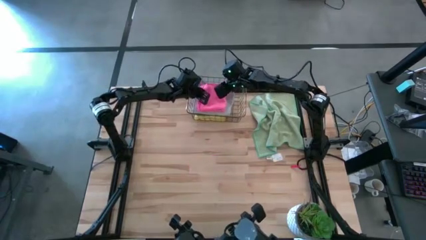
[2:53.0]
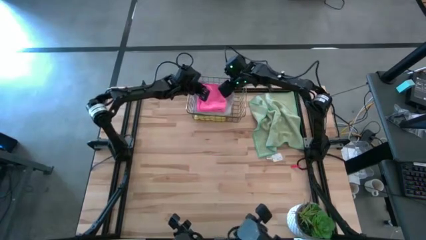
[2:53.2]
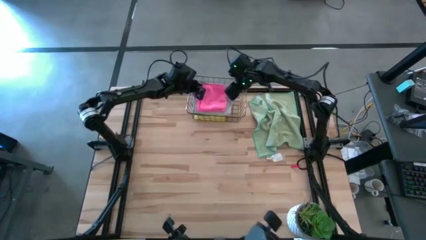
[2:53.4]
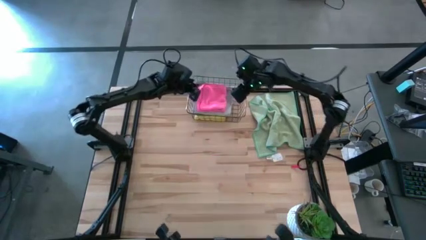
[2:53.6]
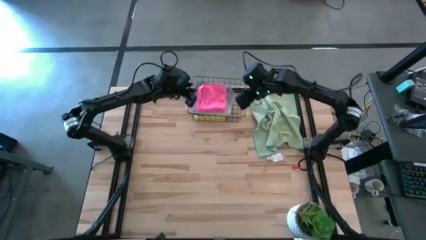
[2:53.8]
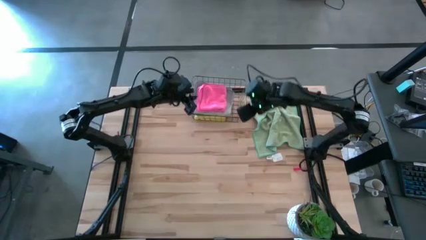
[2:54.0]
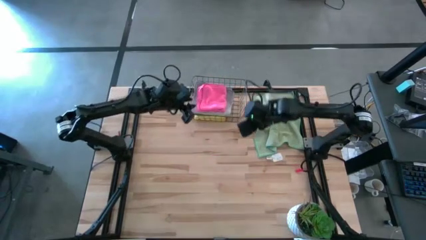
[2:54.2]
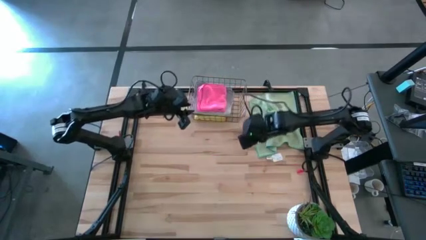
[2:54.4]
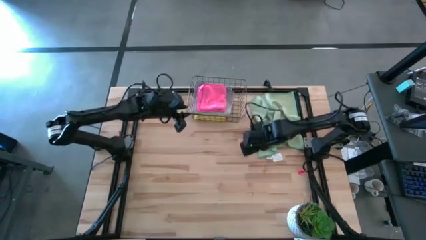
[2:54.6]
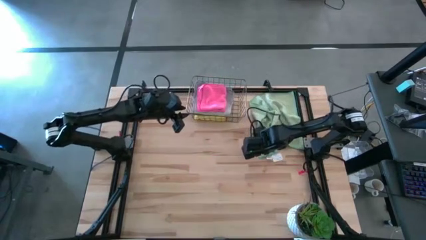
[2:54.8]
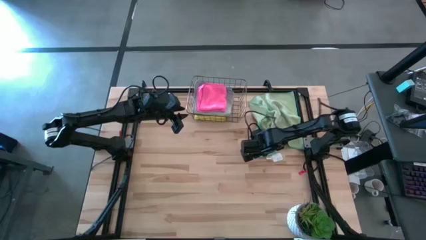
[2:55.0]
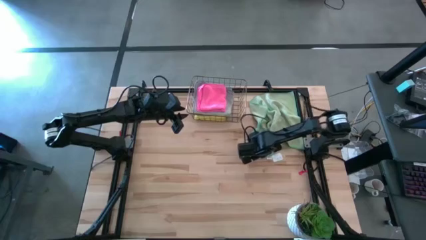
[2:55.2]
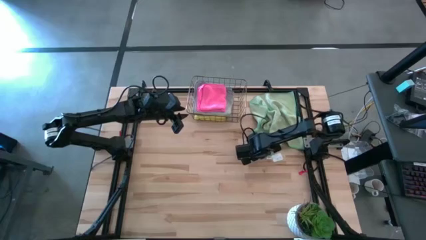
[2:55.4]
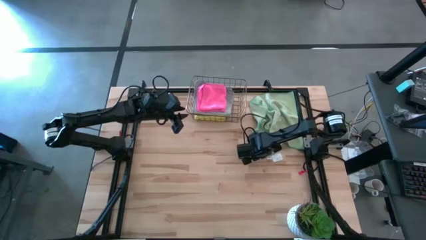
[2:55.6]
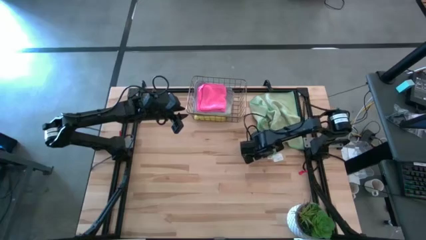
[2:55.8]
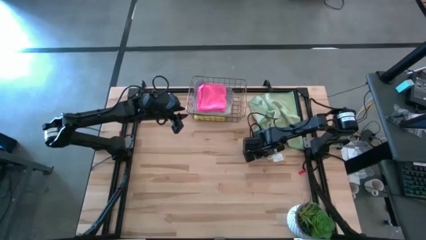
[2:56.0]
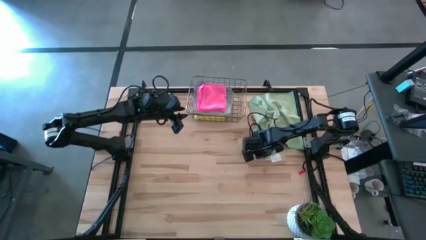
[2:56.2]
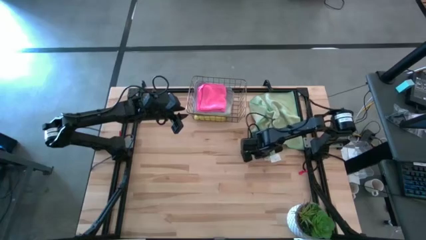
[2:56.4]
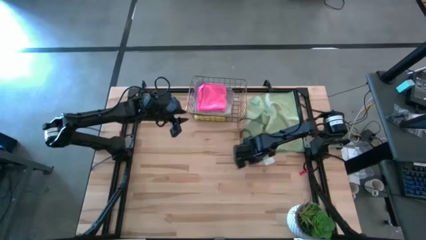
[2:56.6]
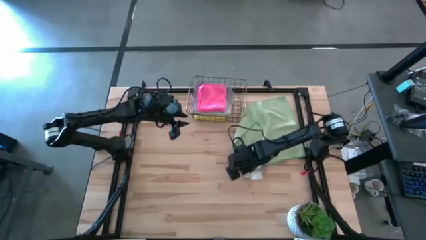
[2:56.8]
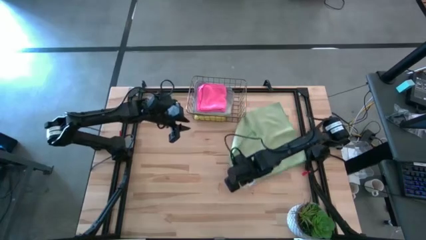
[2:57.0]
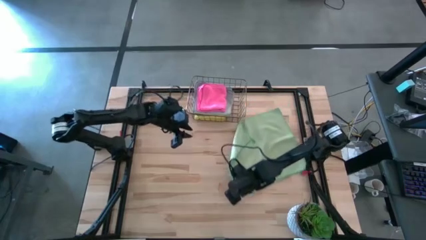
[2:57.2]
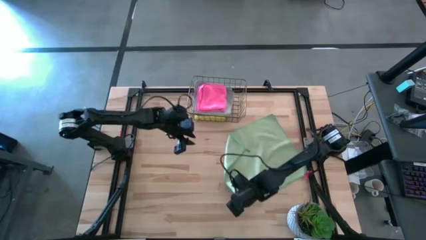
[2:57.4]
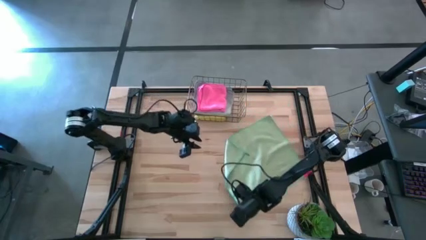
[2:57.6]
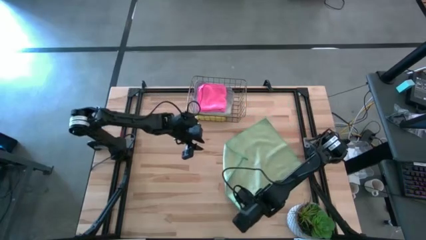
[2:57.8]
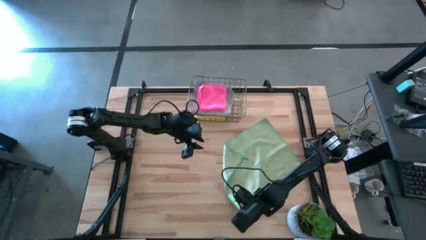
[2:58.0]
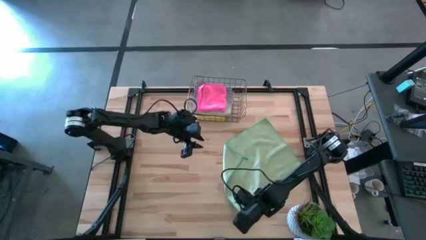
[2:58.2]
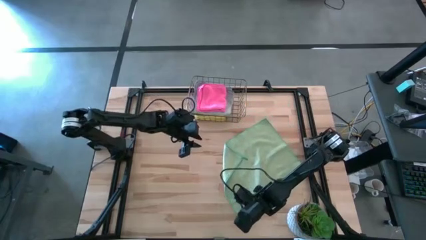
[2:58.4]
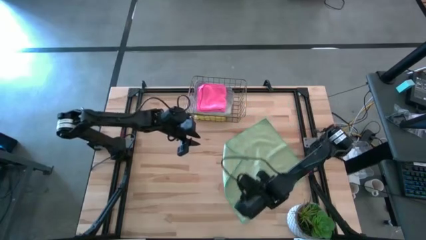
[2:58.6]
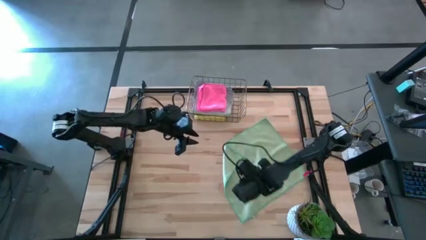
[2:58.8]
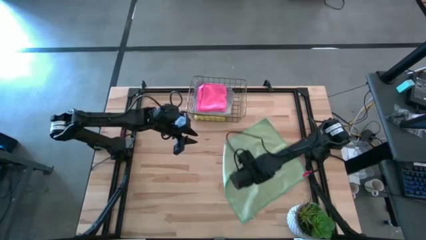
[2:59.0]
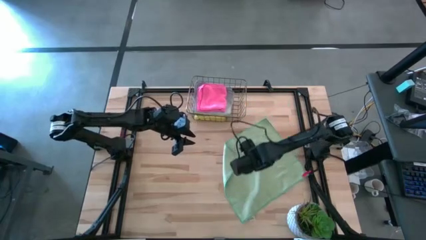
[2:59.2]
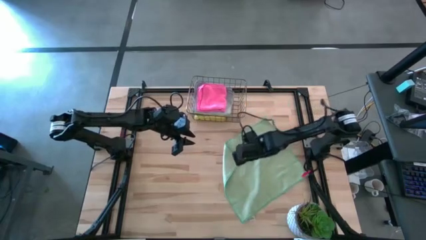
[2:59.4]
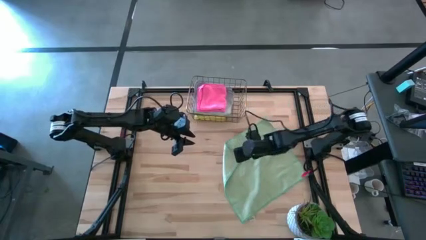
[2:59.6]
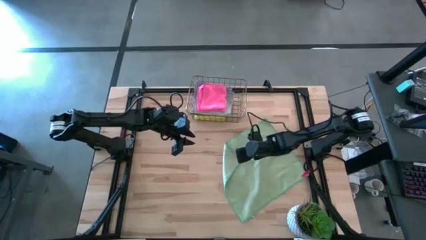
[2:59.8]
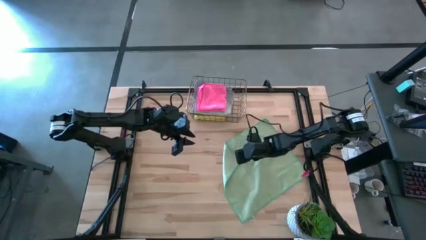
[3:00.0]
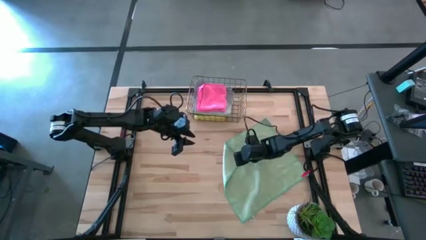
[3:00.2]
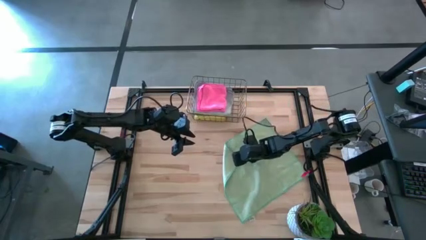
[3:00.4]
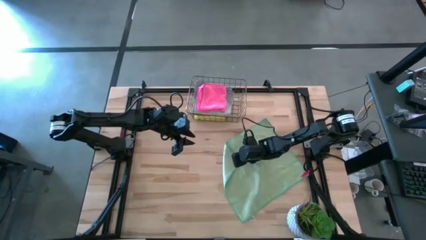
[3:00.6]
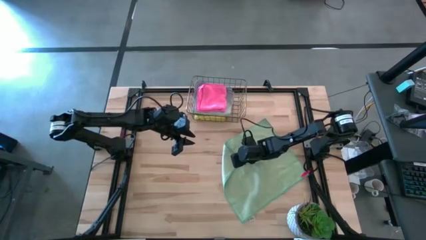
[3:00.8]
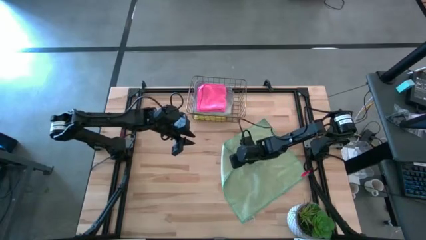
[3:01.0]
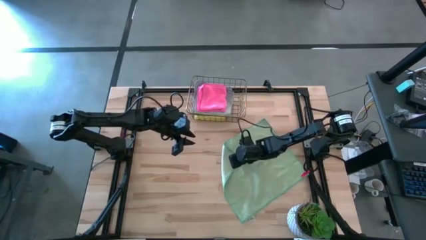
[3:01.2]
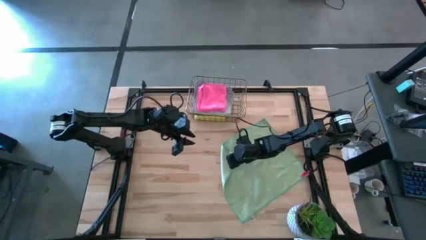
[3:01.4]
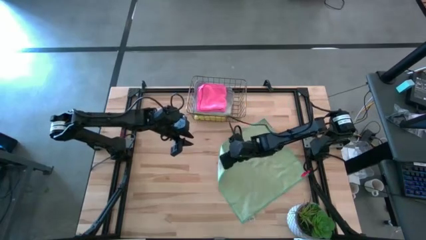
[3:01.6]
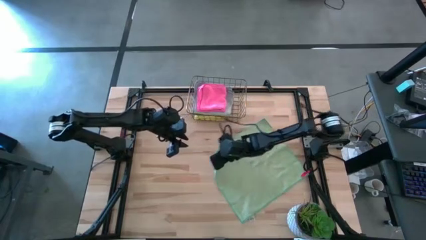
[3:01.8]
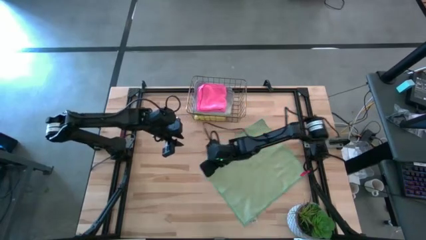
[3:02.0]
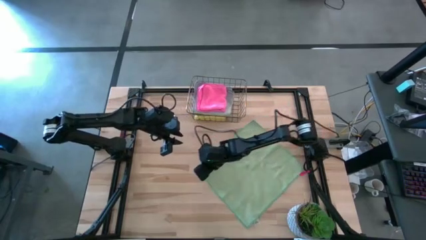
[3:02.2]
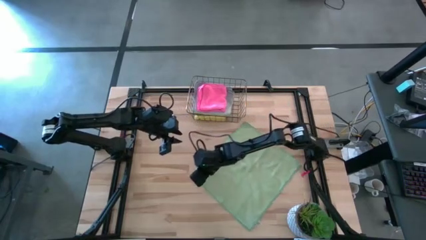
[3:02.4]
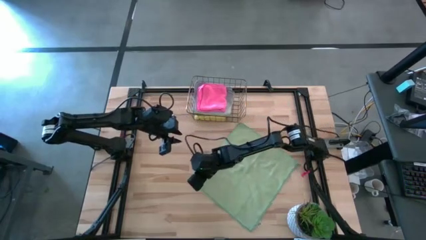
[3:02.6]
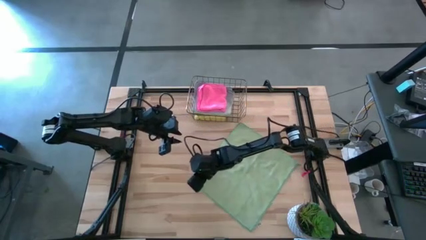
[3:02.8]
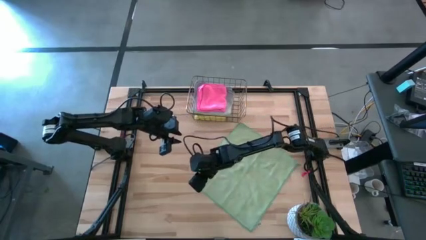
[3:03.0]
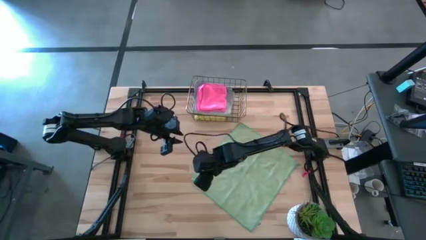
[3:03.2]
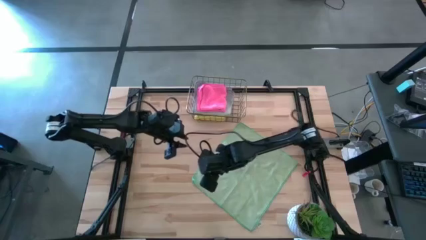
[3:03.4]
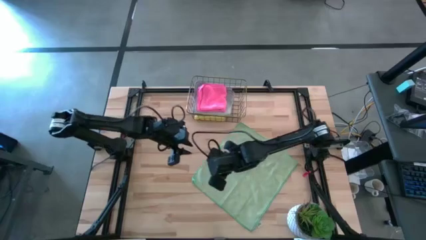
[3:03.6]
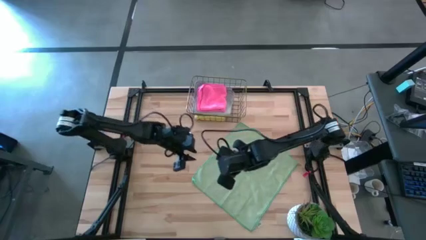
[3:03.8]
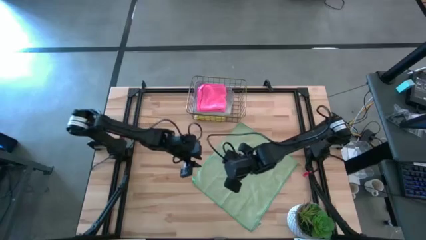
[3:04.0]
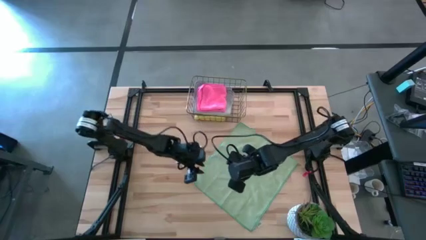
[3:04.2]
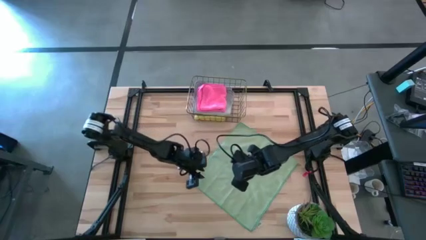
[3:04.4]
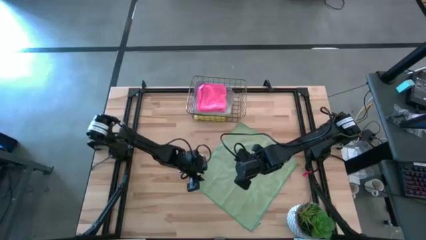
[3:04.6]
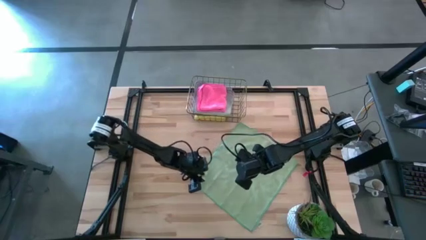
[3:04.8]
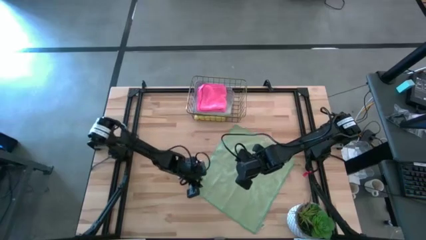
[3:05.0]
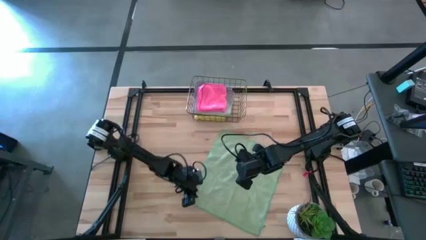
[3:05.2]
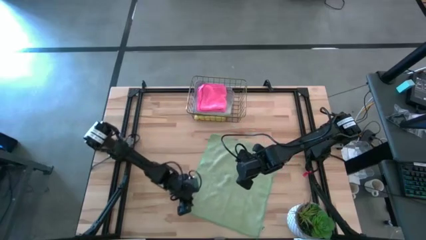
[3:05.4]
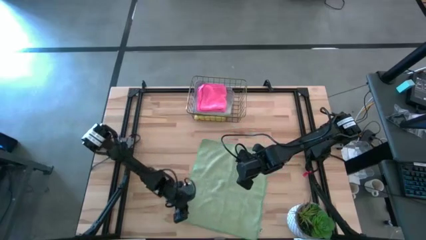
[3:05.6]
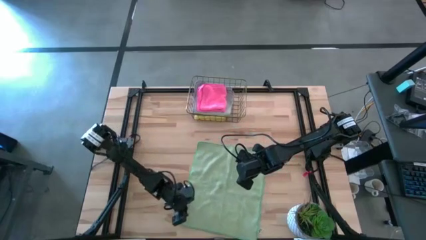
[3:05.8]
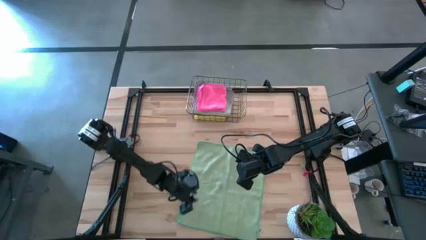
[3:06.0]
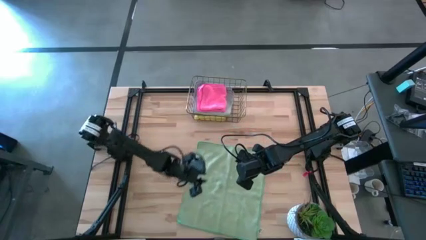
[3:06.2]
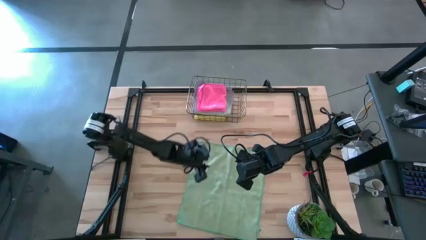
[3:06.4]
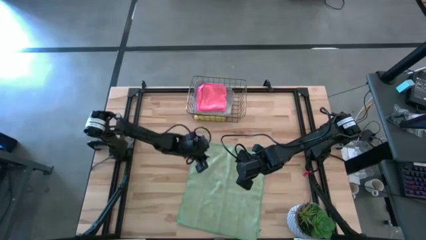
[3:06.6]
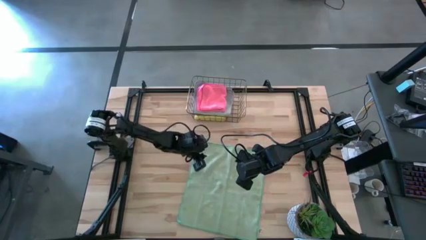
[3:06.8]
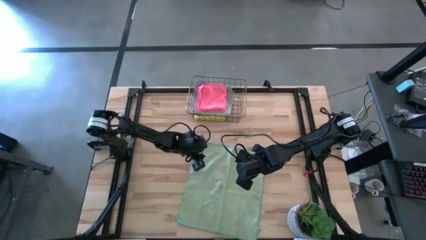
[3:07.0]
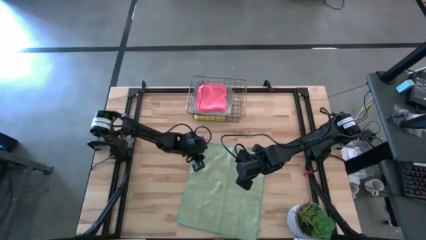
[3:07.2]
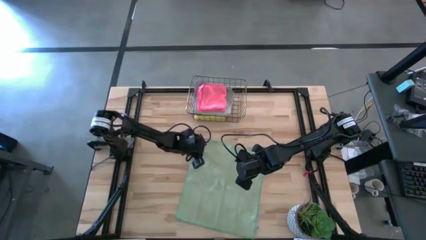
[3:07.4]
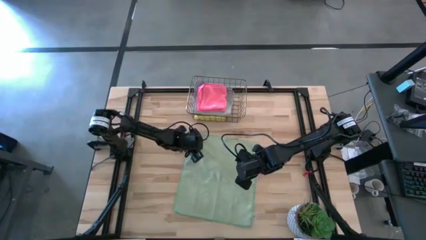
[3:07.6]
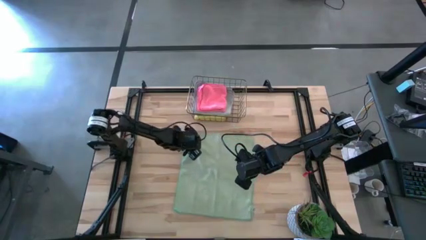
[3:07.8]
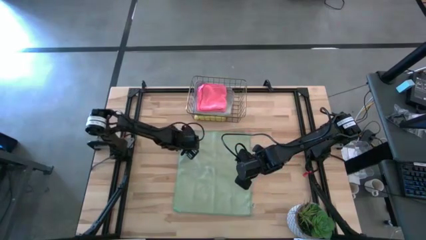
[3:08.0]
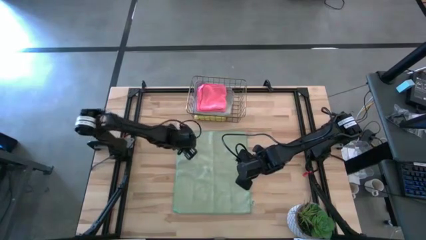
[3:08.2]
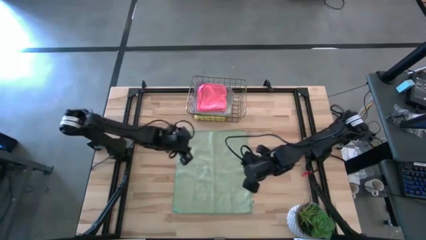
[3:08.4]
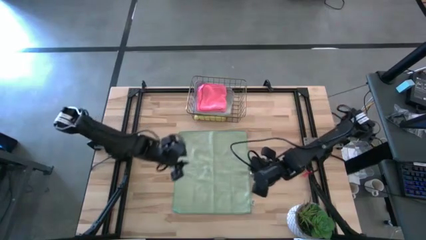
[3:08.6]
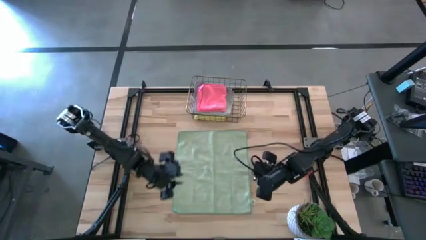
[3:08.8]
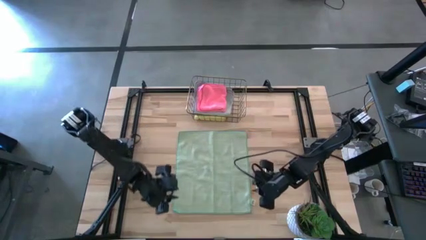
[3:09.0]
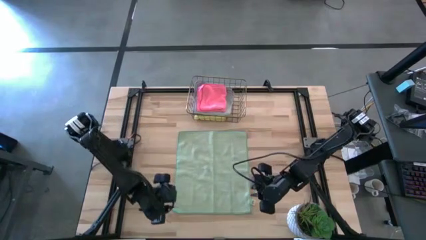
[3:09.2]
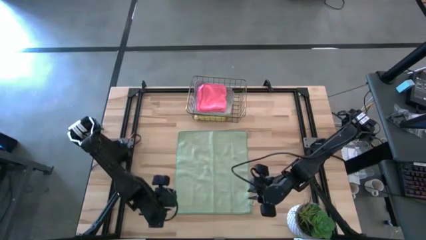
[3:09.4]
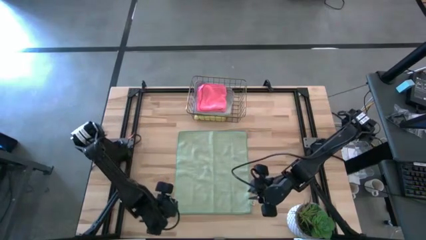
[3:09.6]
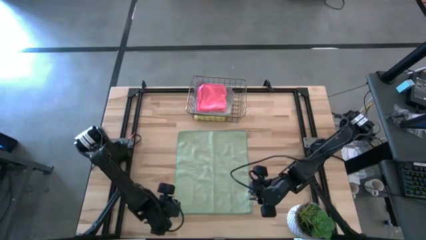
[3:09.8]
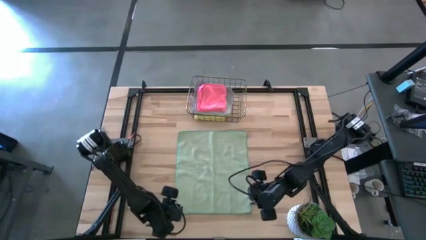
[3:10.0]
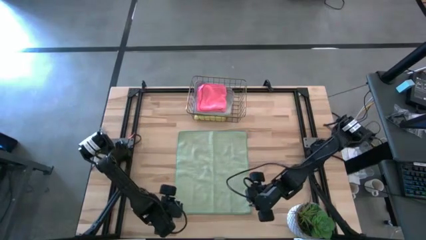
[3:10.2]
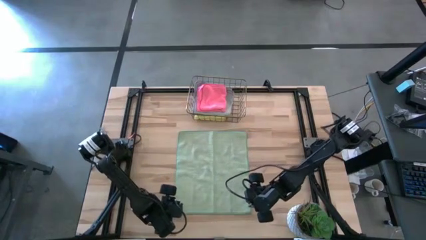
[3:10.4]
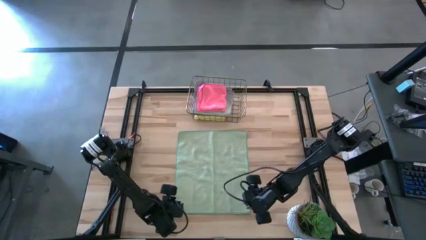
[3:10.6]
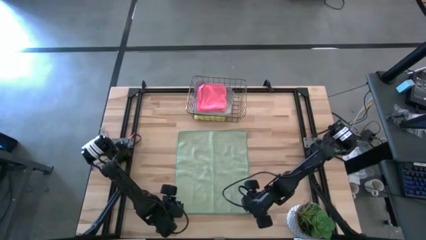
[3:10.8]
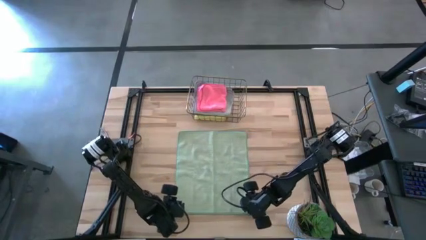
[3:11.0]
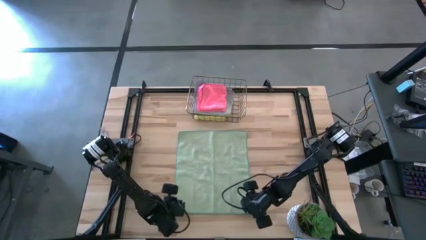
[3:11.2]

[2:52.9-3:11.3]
Task: Fold microfiber towels
Fold the blue towel
